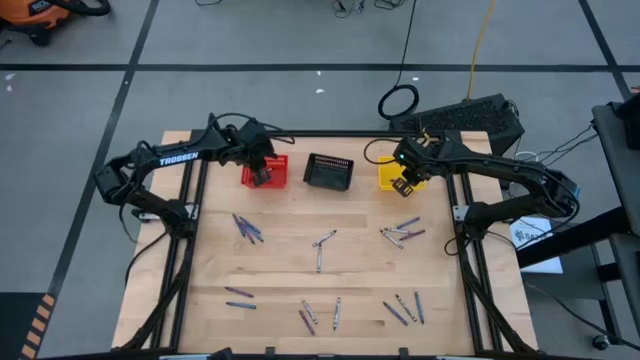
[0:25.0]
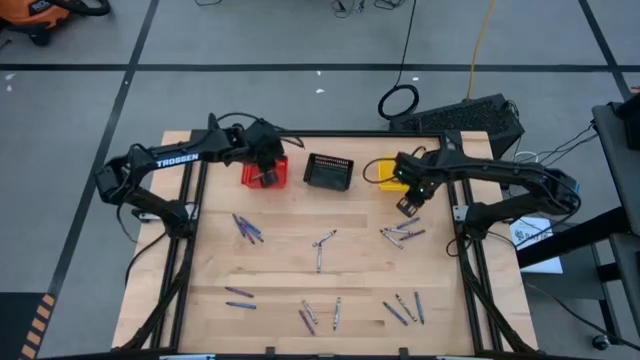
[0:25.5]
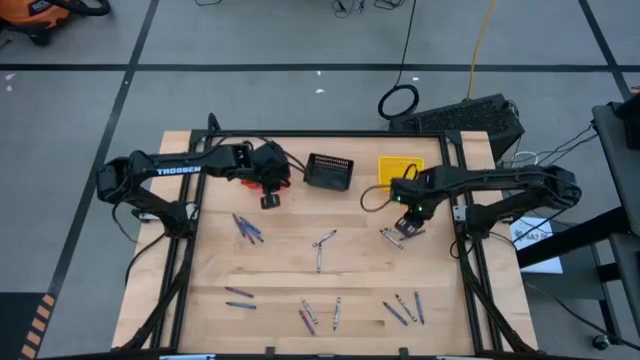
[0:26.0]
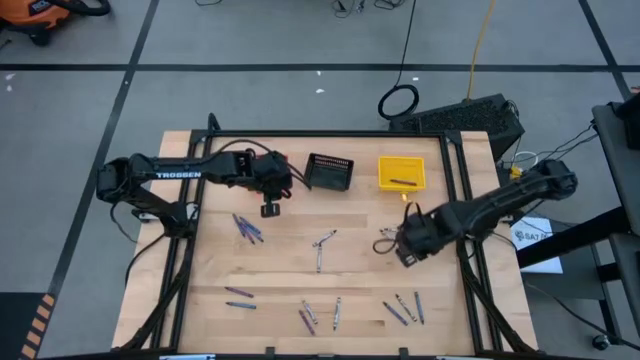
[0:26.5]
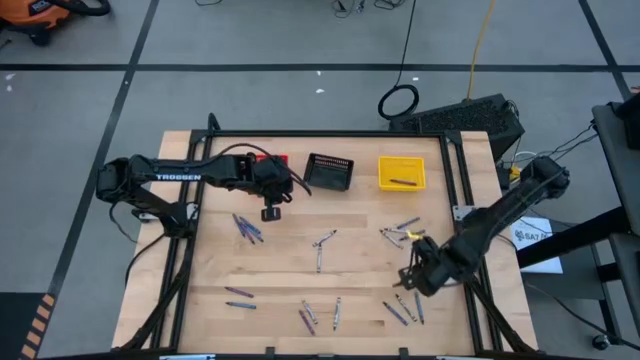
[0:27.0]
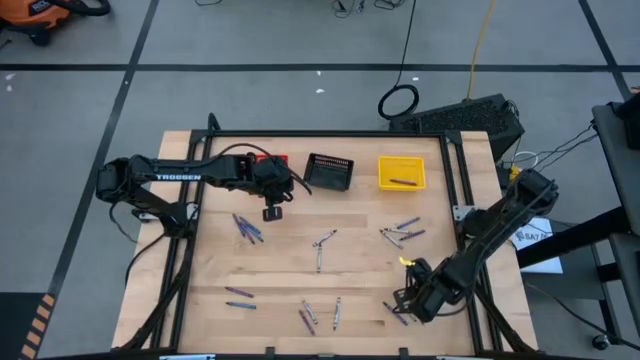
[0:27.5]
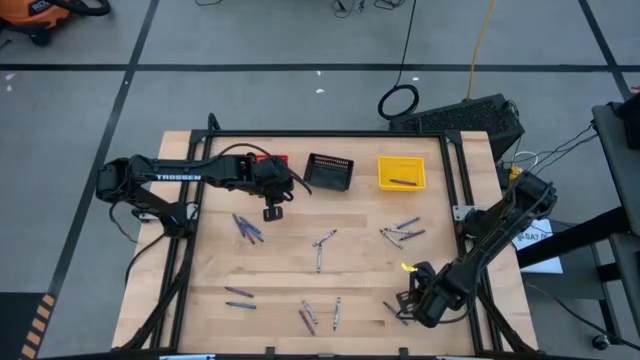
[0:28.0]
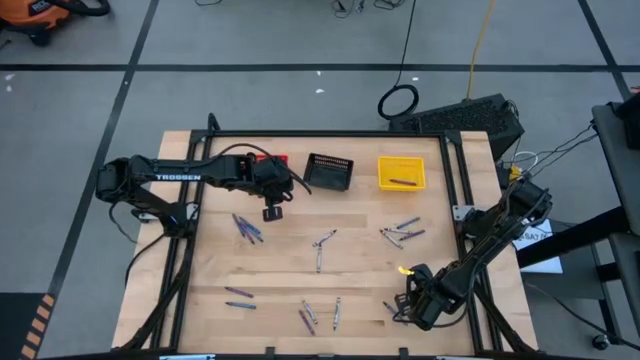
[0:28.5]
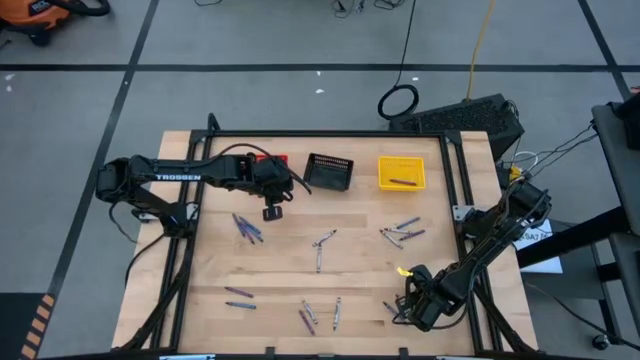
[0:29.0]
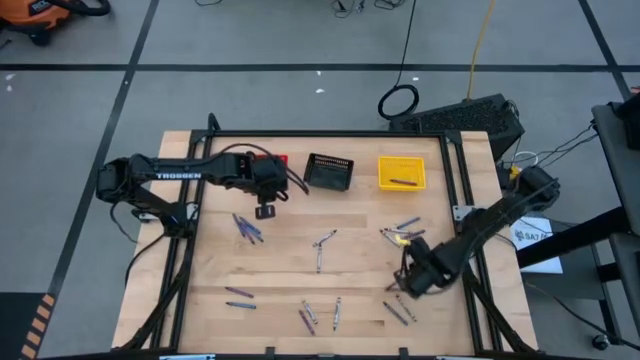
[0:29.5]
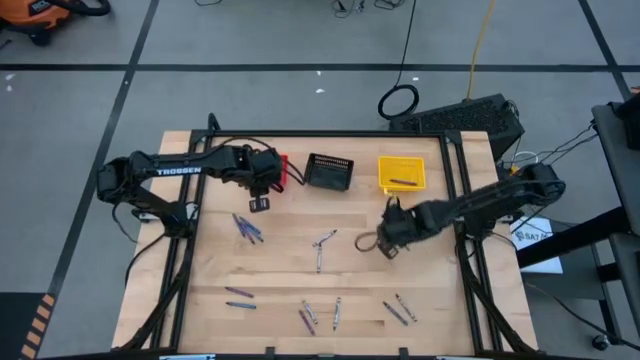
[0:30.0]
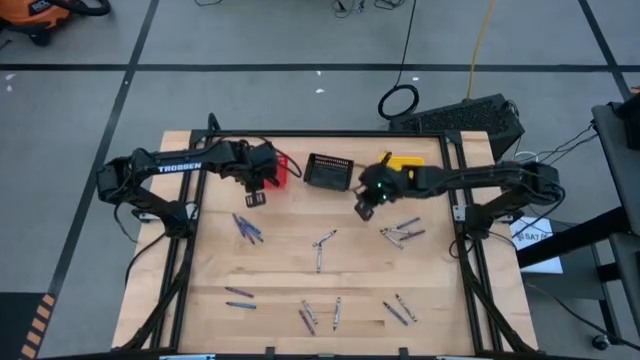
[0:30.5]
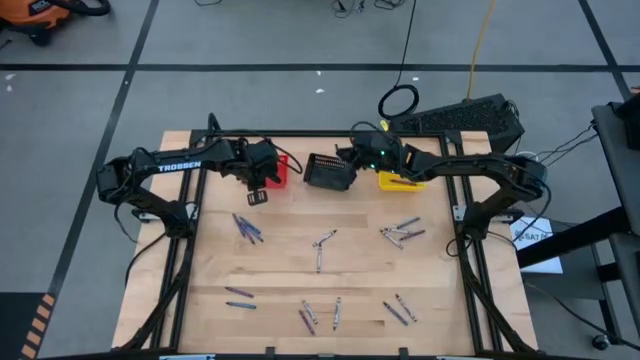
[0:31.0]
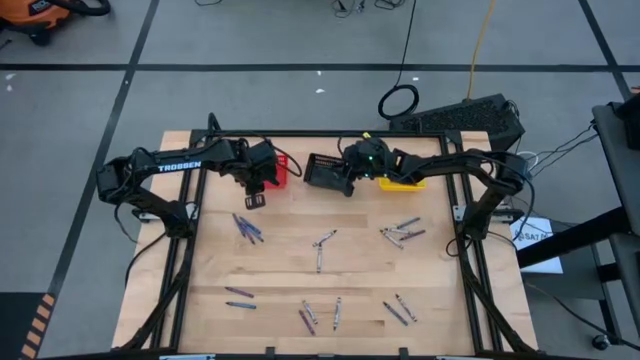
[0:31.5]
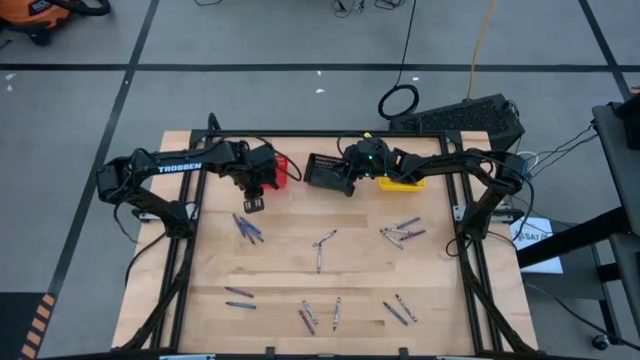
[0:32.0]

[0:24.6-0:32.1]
Task: Sort crayons
Put the blue crayon into the black bin

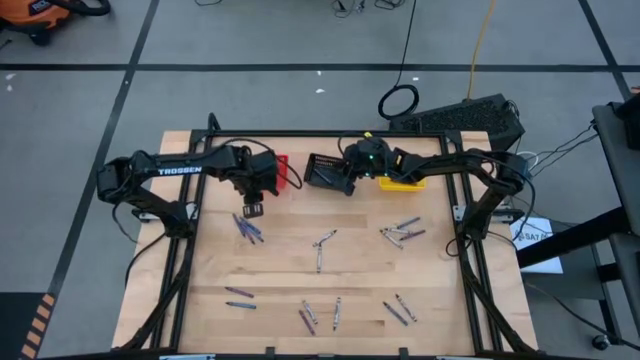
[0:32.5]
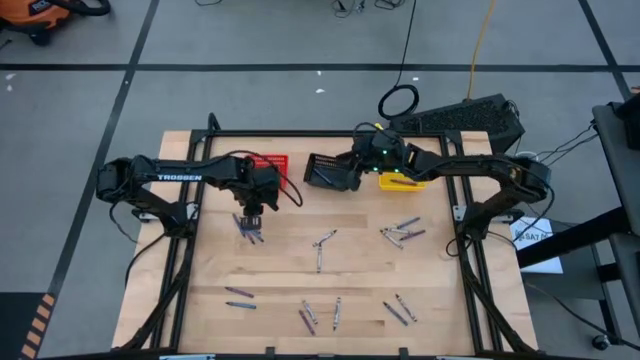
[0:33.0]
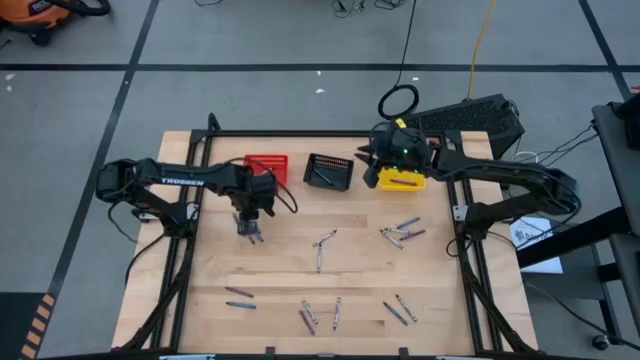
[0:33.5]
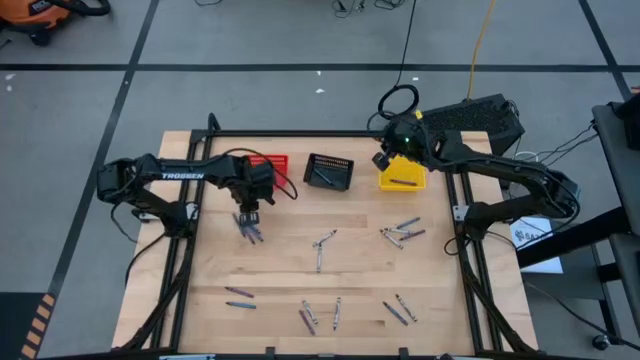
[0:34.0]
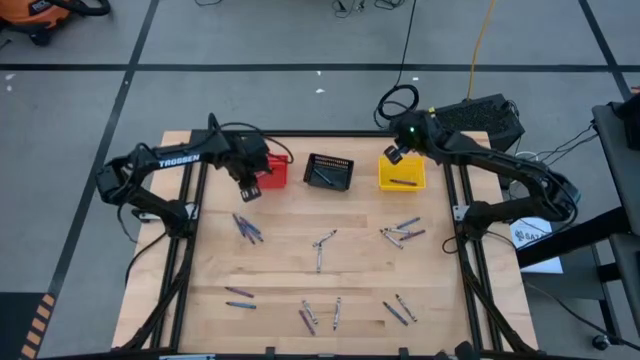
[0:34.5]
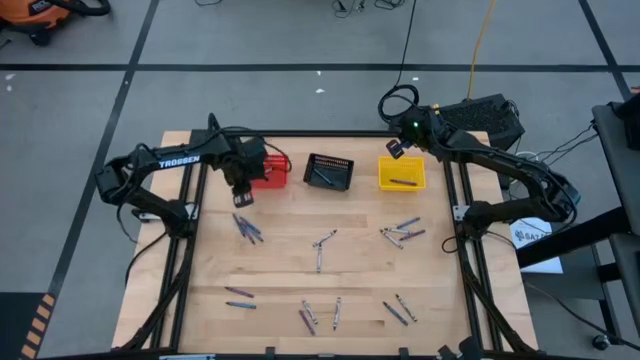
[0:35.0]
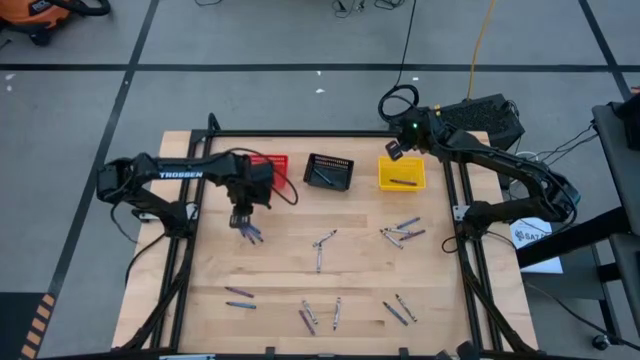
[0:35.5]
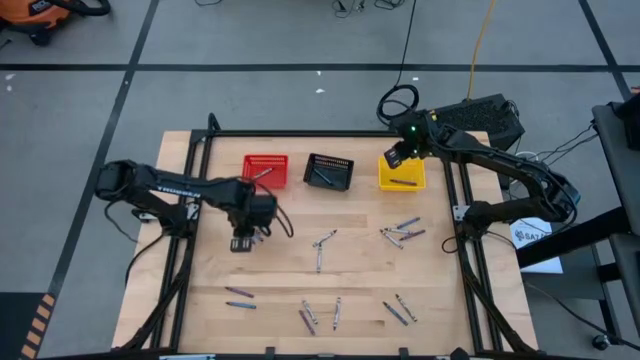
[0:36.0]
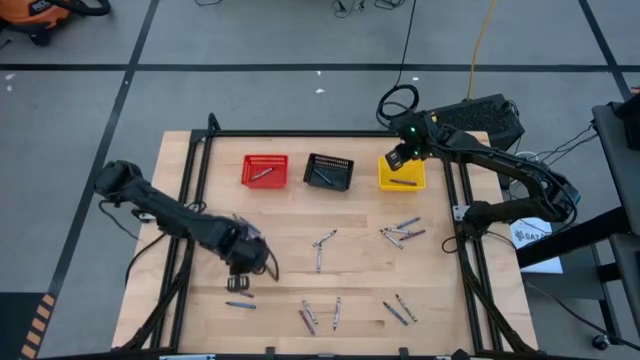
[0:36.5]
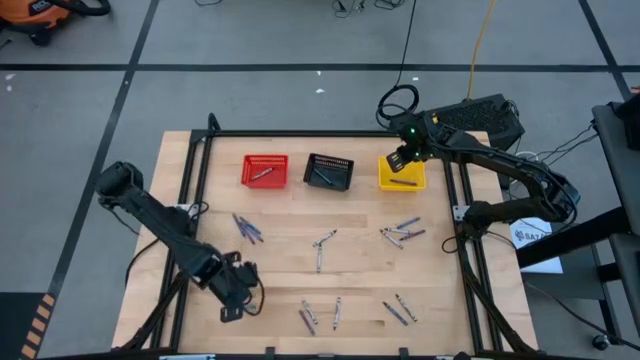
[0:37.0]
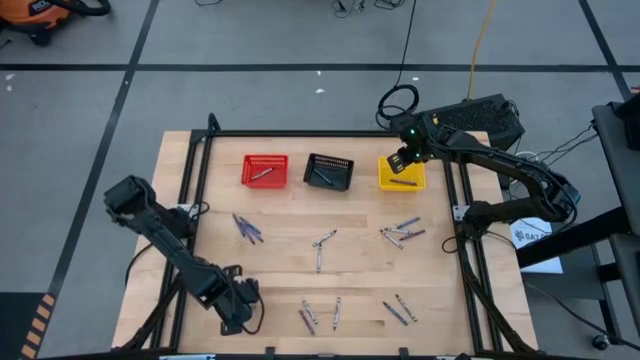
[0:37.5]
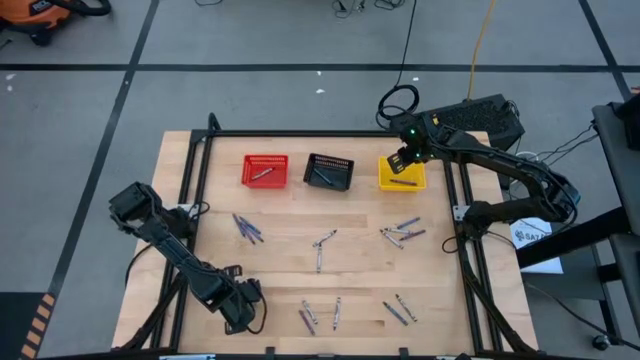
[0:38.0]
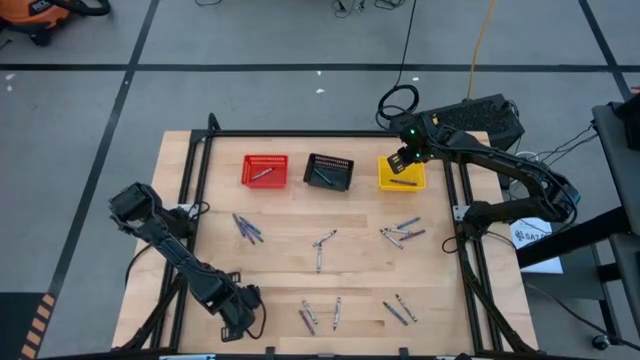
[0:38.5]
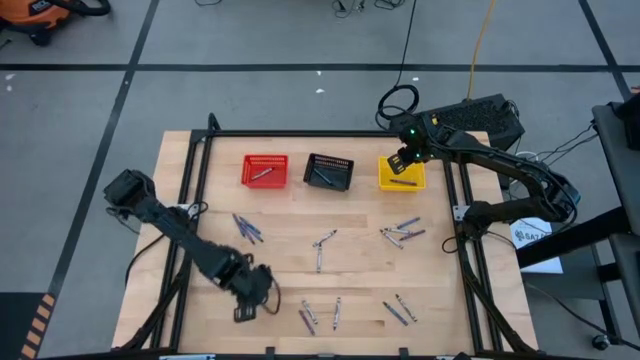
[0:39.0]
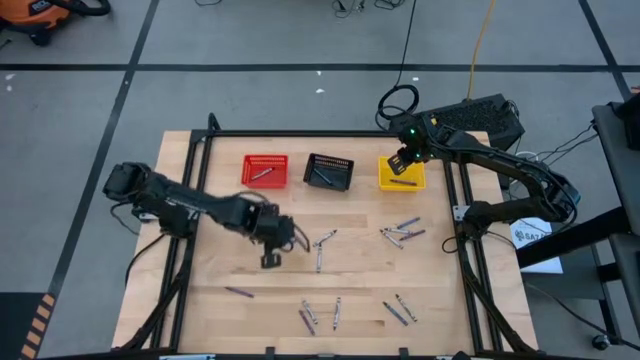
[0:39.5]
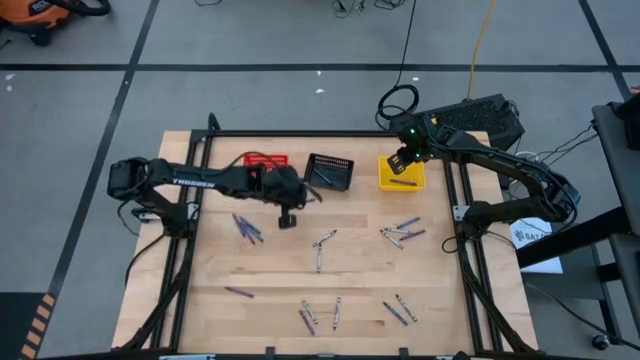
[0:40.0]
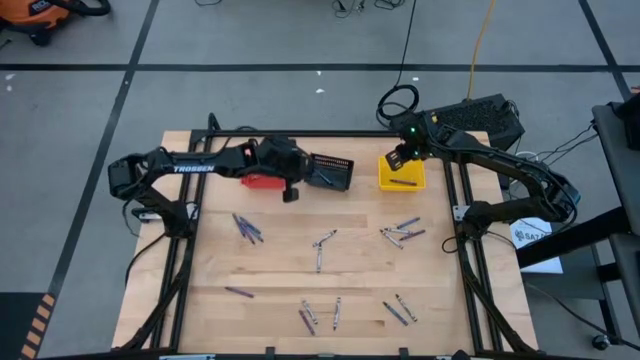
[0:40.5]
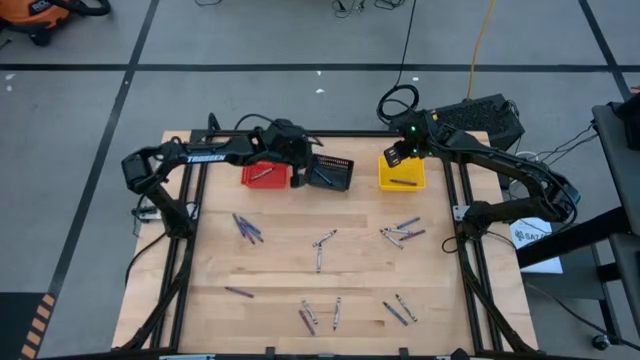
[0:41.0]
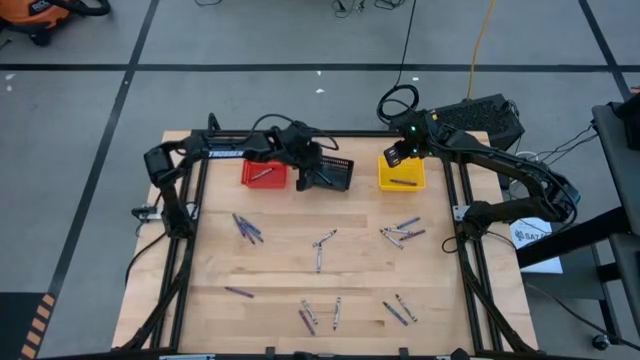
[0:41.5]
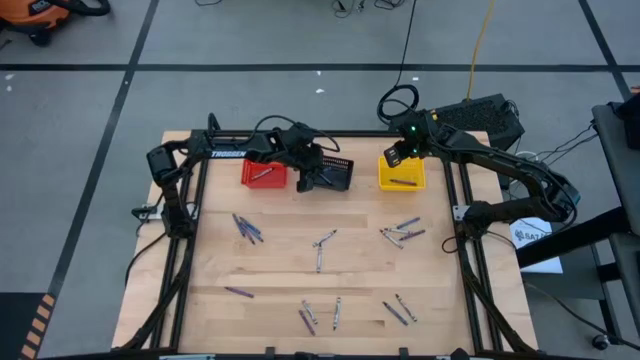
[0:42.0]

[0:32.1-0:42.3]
Put the blue crayon into the black bin

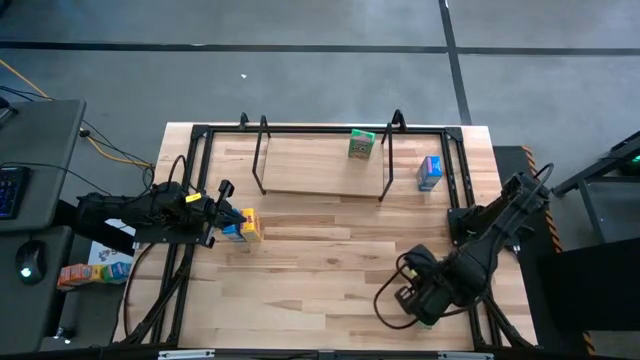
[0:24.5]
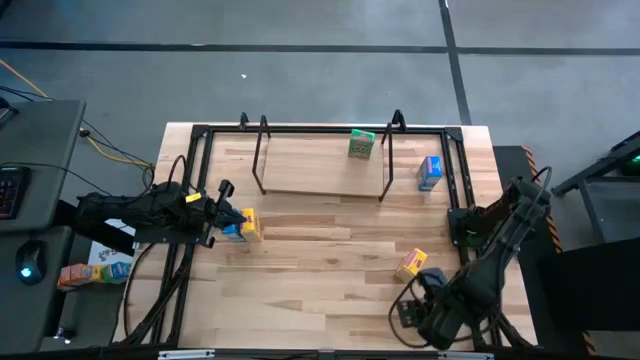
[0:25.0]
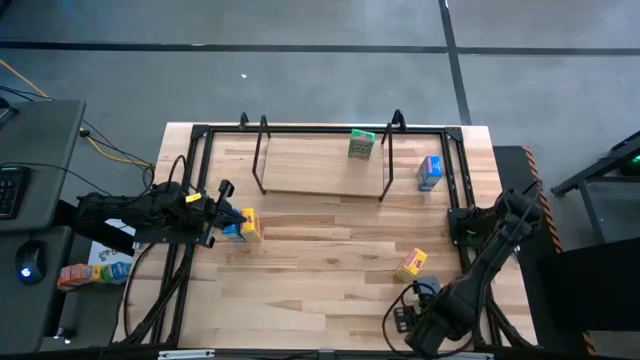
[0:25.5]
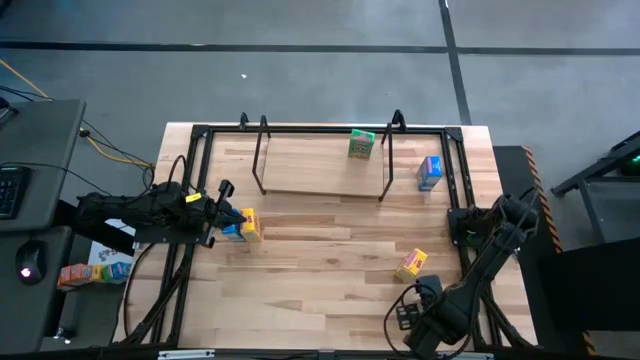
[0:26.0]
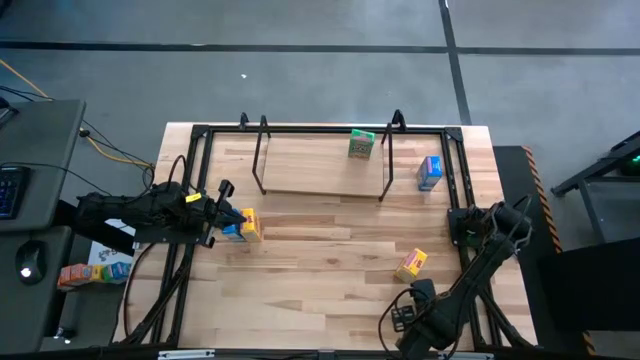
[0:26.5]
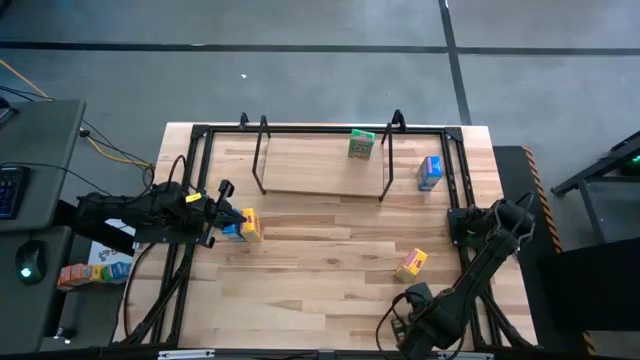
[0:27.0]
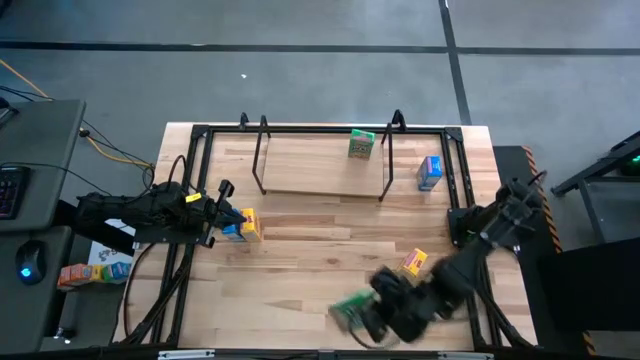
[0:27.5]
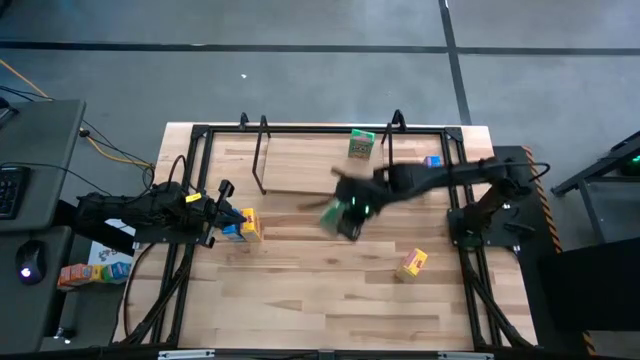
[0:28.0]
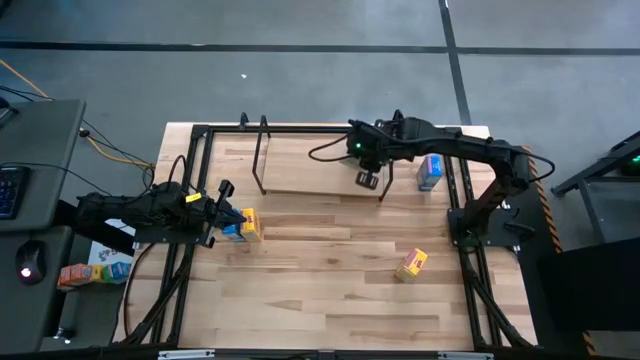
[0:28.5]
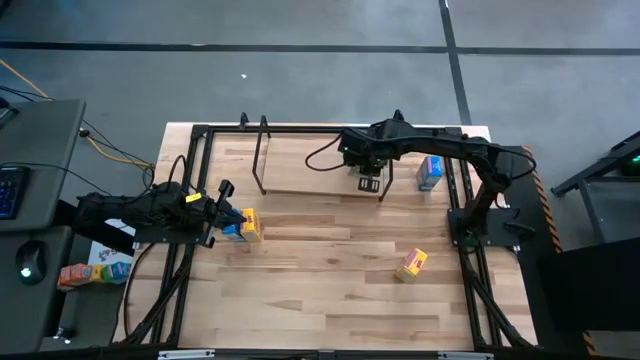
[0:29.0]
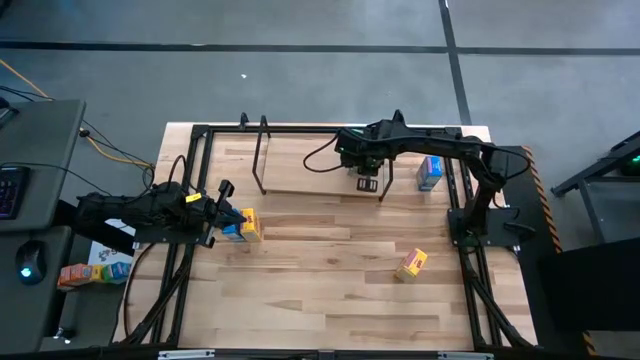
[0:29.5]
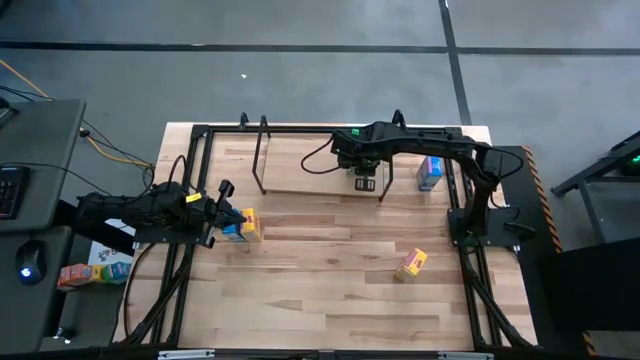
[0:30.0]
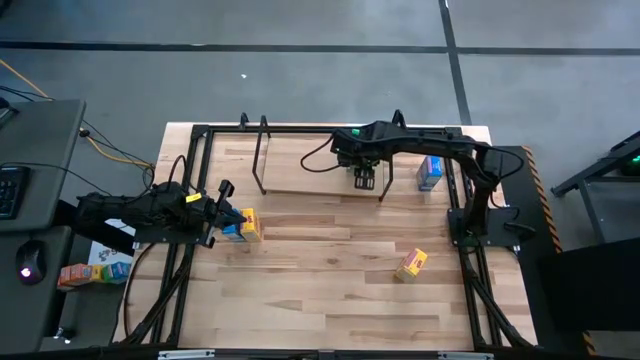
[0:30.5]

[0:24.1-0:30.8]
Task: Stack cereal on shelf
Put the green cereal box on the shelf
